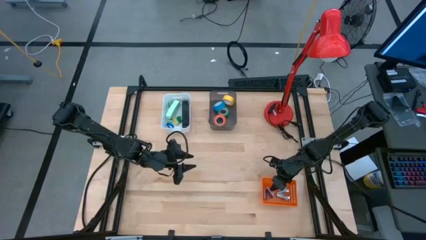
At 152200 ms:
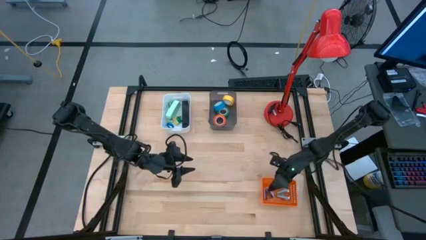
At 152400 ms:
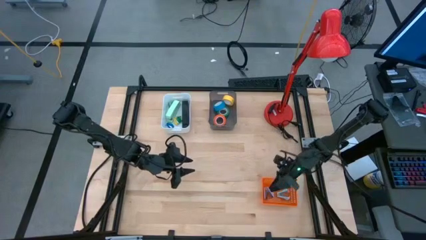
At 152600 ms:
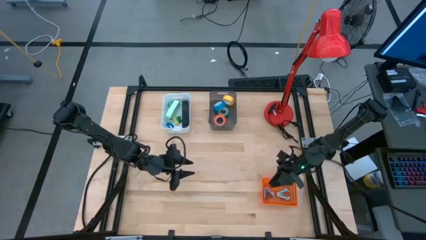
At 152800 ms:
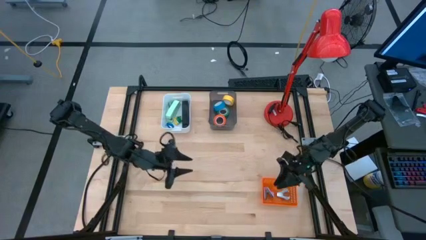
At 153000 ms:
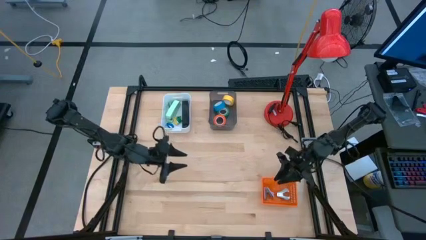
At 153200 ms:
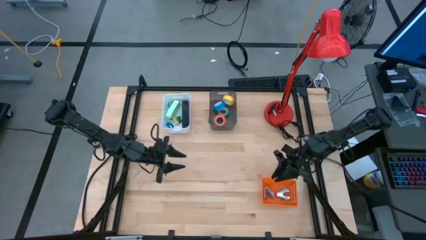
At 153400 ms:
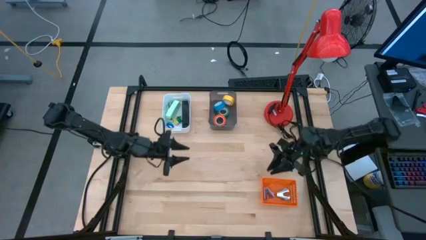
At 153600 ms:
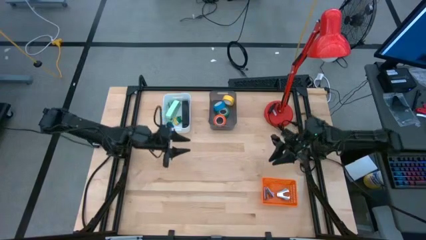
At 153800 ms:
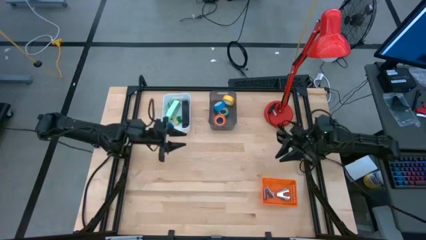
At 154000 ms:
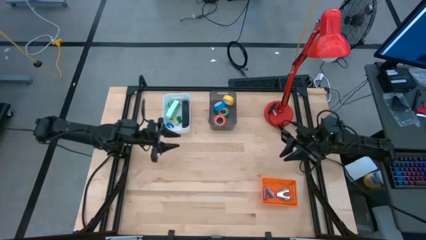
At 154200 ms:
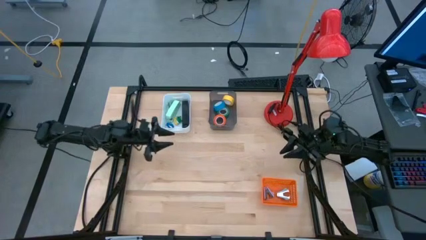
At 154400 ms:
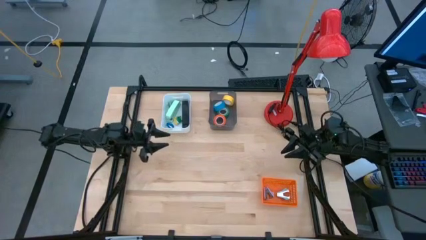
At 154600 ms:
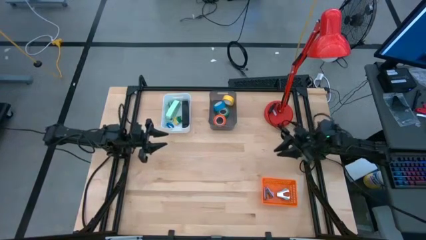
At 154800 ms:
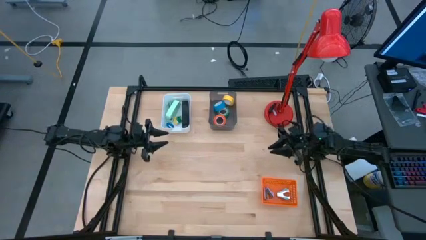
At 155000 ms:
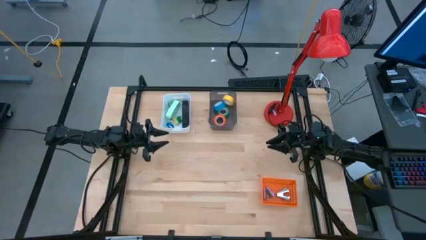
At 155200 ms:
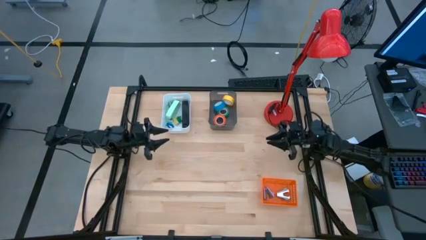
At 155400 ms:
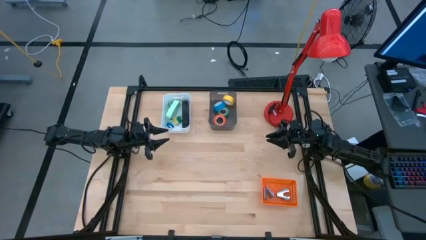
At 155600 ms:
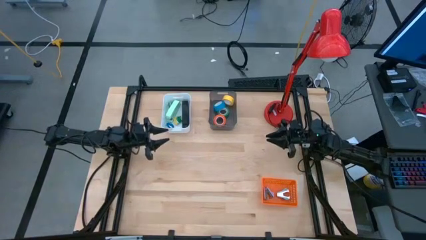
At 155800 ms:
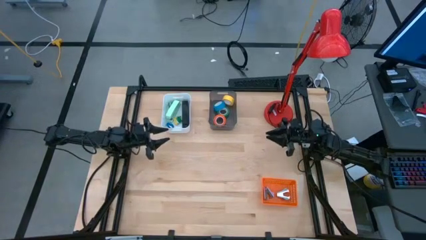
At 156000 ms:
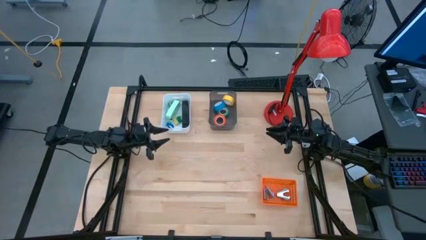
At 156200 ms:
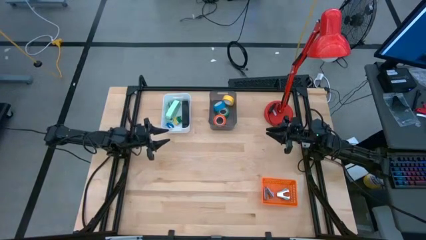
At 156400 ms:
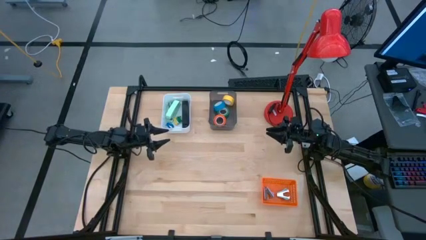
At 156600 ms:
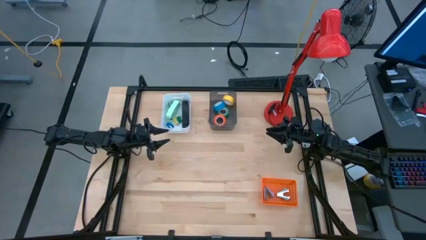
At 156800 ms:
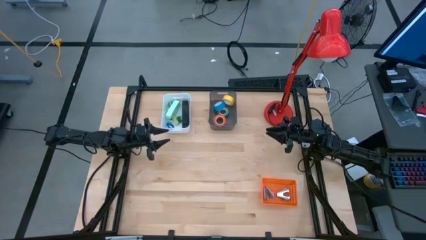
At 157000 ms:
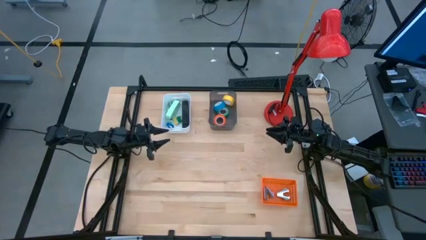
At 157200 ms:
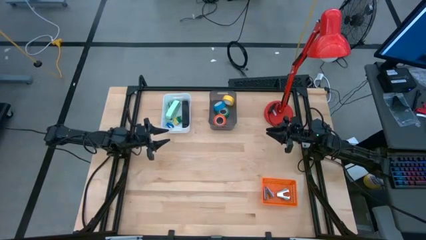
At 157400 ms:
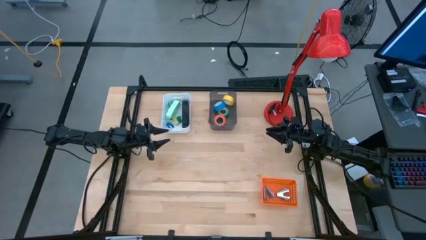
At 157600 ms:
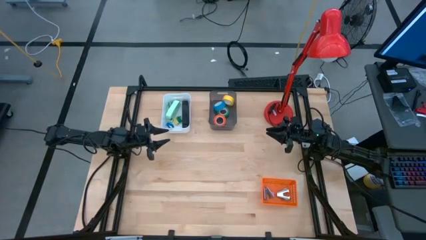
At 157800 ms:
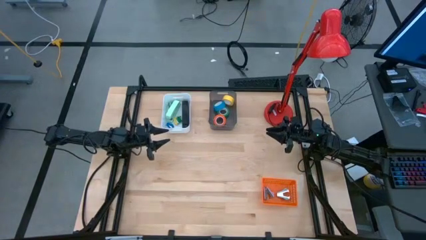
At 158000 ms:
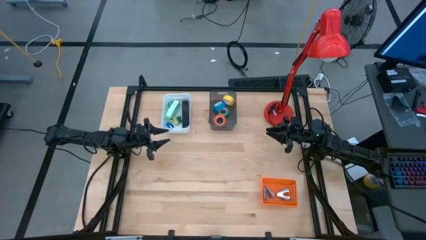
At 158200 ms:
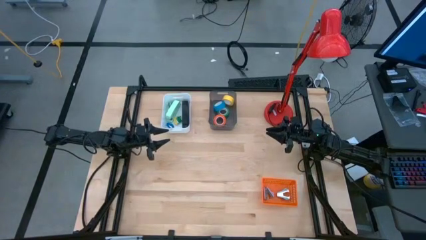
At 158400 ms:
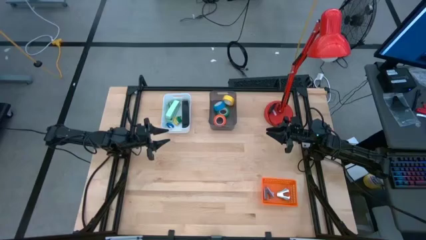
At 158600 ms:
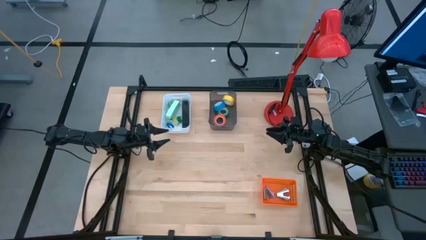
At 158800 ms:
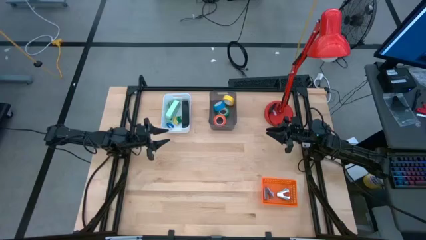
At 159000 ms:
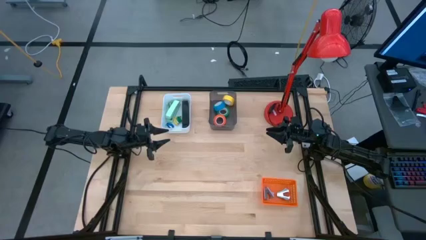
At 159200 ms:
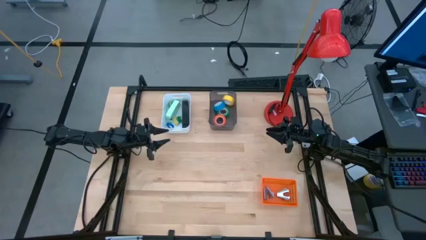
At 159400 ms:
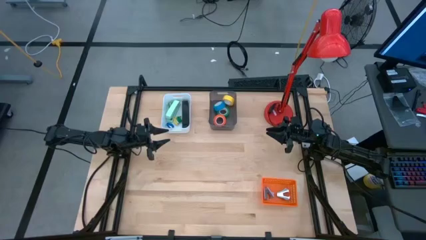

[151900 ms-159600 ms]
Task: Pick and place Stapler, Stapler remover, tape
Return to Home Position

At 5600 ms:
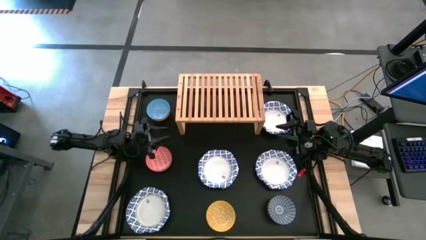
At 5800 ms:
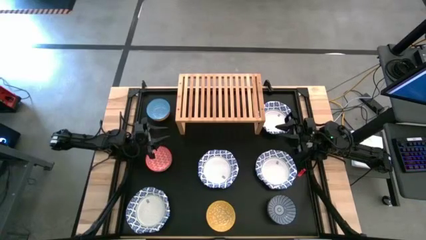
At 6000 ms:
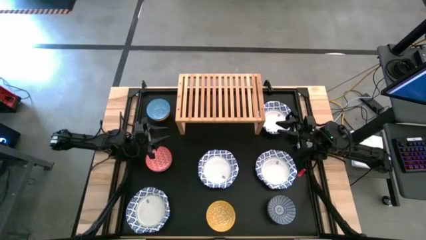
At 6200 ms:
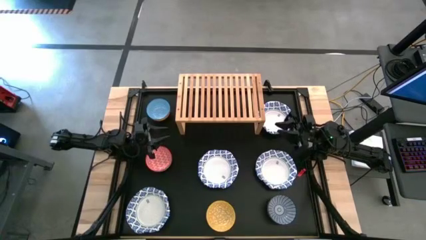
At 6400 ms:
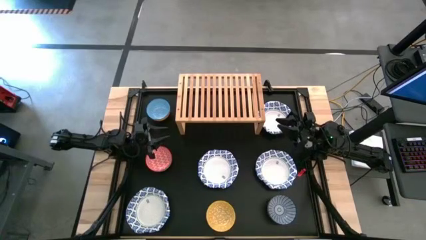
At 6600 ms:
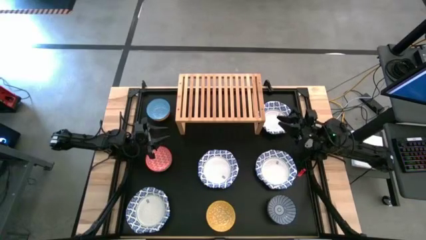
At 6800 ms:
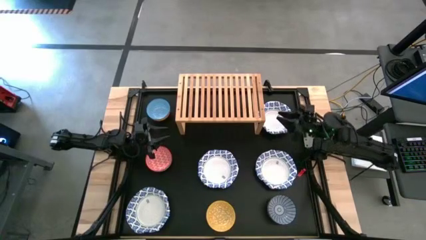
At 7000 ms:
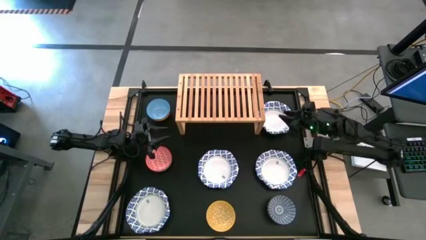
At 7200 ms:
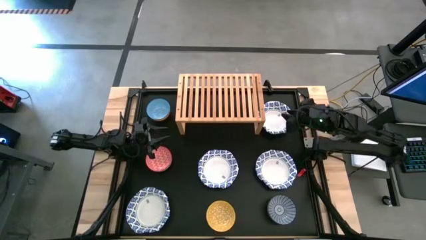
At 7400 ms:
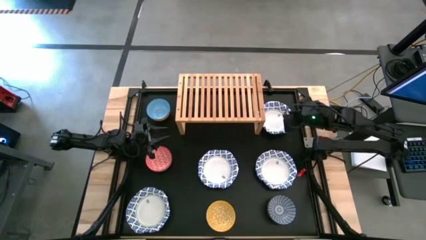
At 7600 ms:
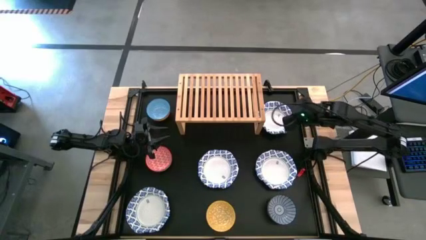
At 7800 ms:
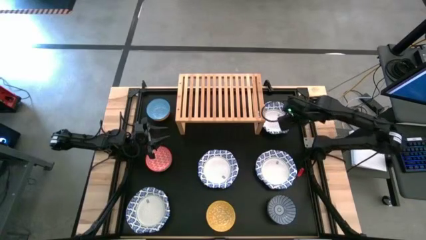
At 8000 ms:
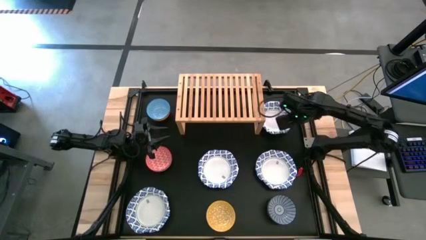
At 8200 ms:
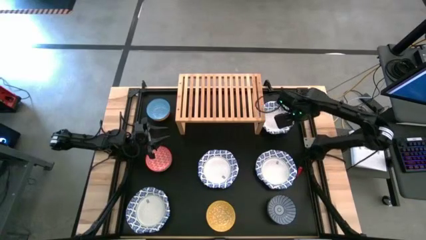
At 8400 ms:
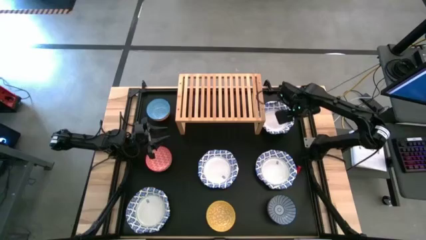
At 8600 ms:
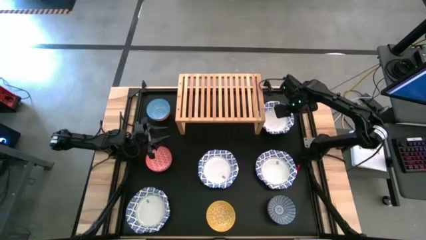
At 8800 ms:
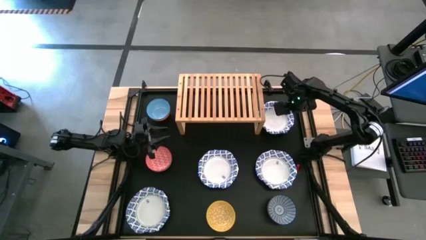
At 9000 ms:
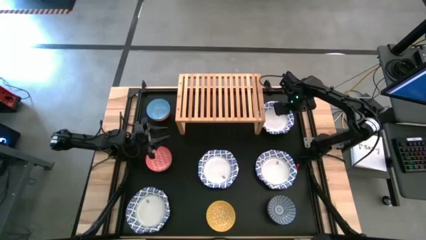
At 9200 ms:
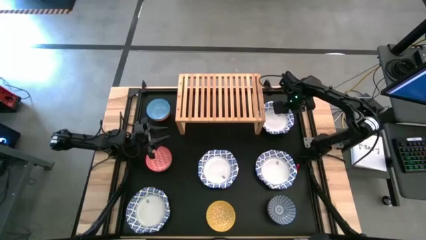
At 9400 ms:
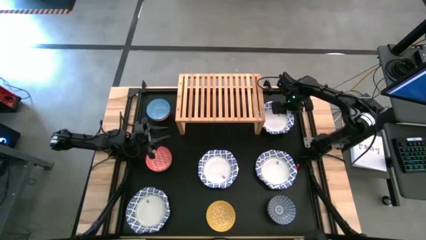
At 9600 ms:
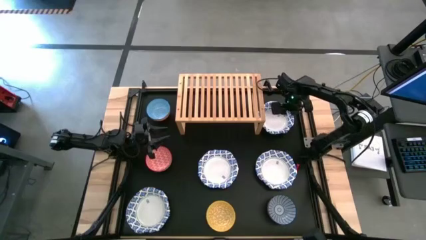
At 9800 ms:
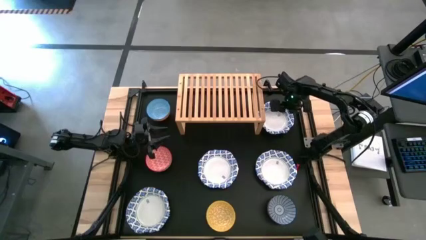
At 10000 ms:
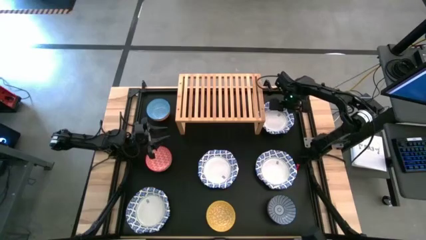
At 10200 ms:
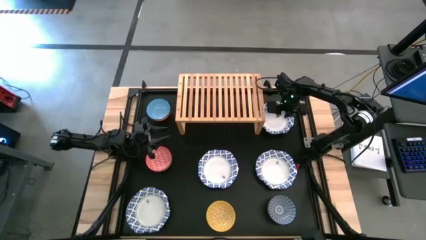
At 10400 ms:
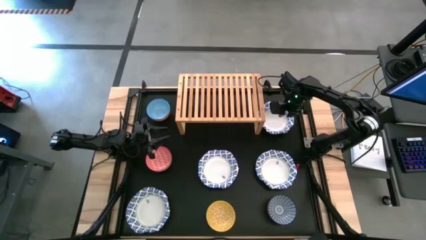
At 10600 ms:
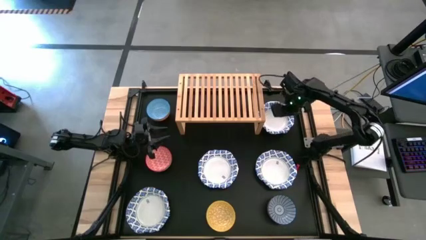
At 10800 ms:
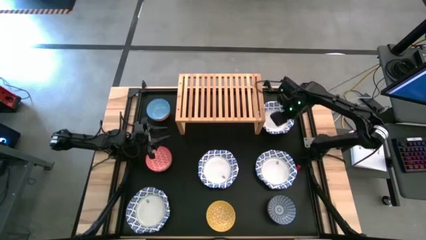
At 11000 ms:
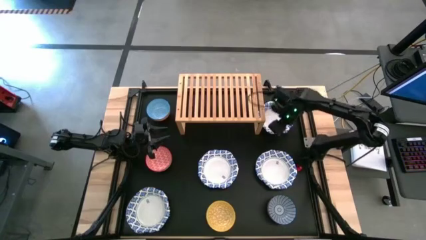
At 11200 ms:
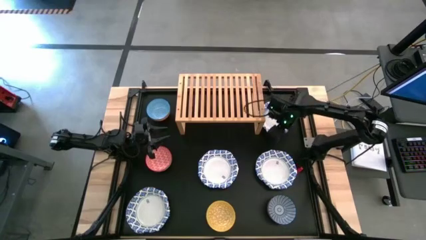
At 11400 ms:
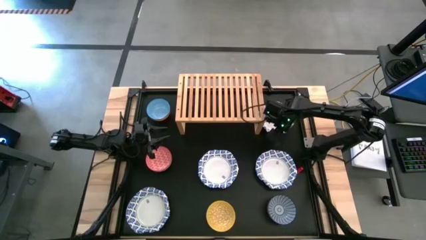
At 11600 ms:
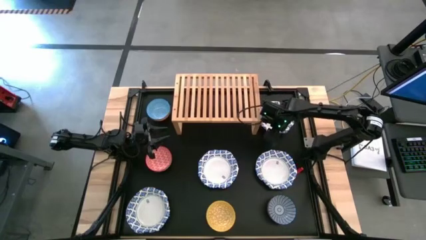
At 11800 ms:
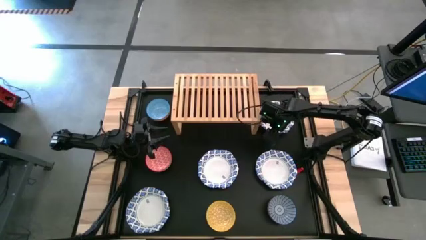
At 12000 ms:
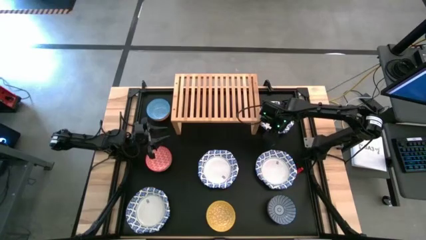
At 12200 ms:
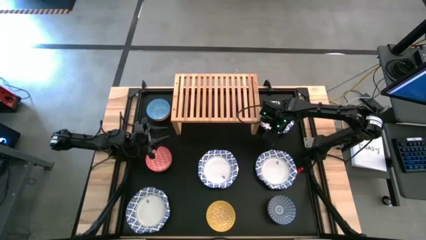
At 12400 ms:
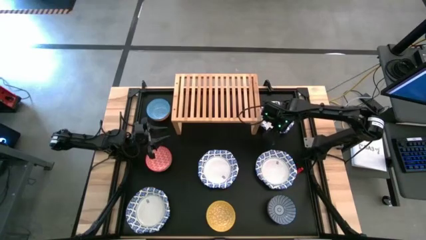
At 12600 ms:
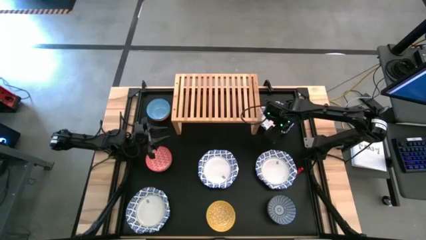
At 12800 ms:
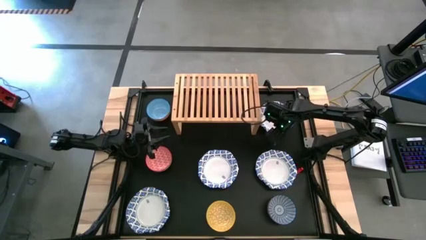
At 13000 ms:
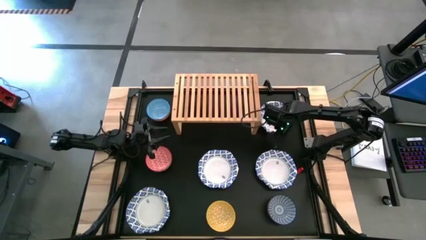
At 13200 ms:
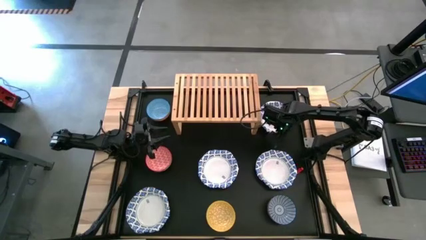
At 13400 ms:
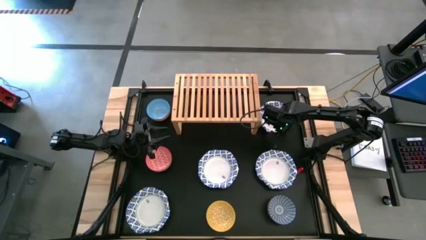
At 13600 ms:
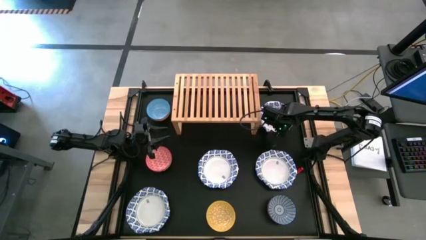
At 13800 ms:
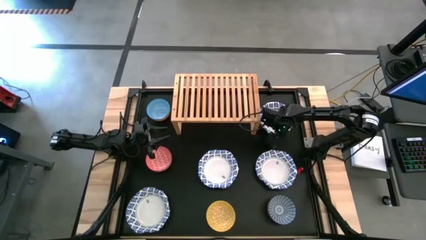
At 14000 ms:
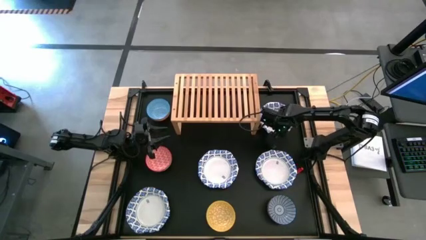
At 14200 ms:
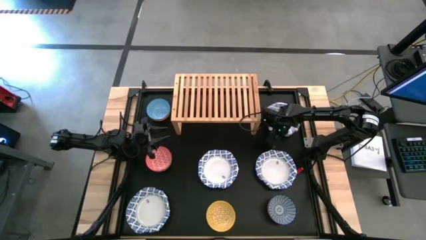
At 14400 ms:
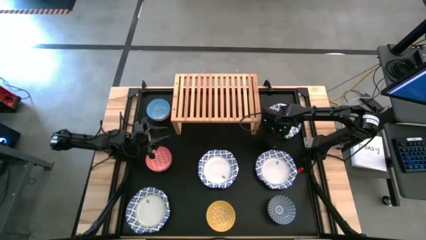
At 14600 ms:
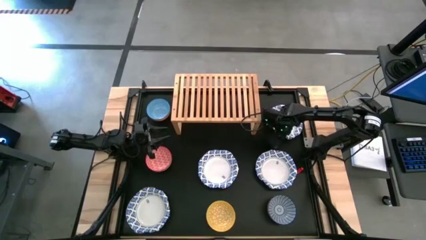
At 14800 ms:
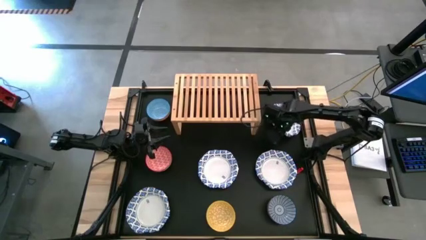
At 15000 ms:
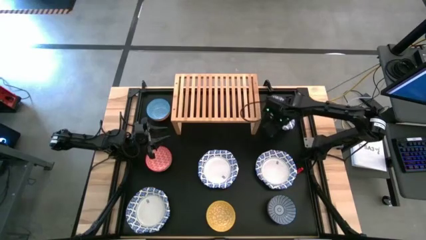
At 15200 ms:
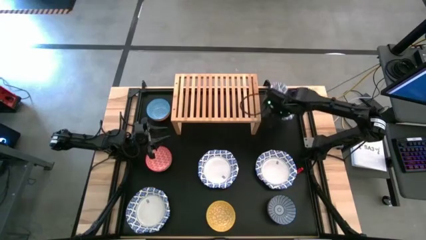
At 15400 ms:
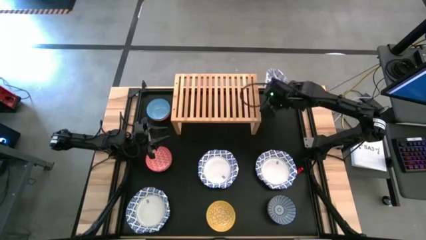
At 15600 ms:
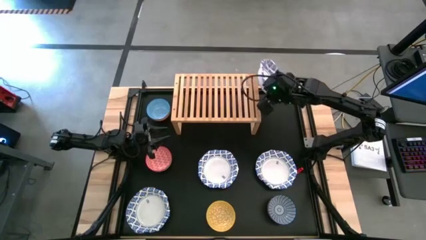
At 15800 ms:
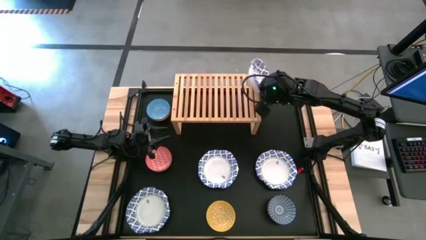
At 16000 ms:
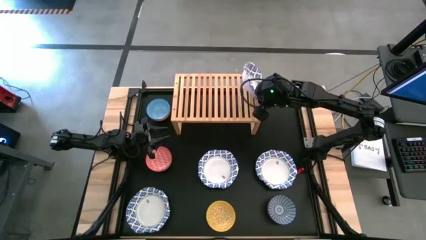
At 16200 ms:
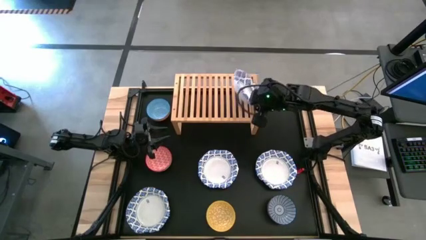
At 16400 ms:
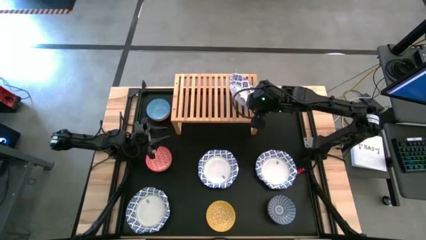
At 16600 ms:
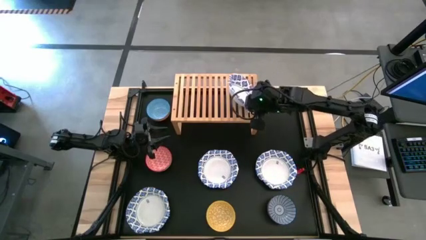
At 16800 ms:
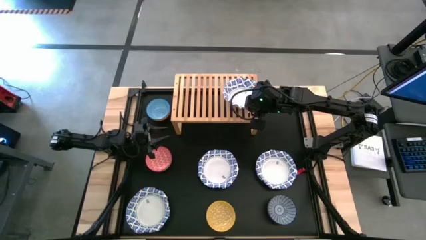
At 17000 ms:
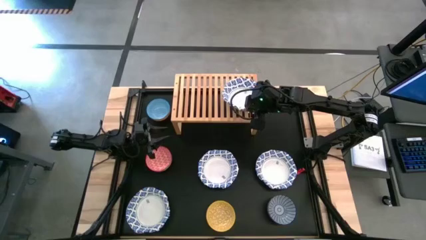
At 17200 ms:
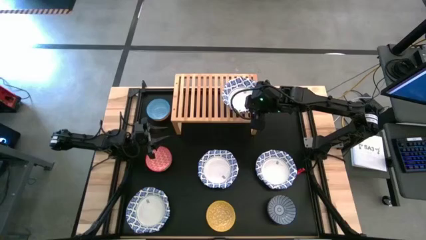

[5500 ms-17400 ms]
Task: Place and stack bowls onto a shelf
Put the white patterned bowl on the shelf
